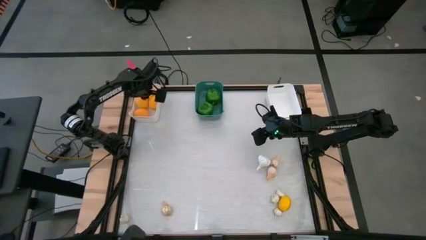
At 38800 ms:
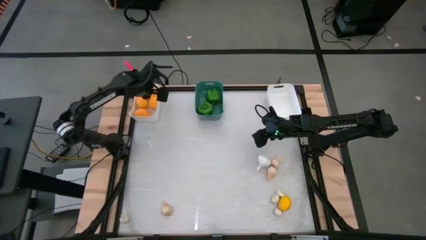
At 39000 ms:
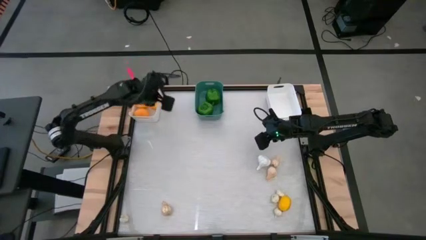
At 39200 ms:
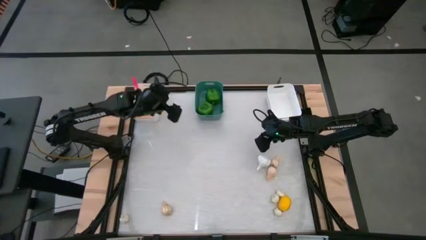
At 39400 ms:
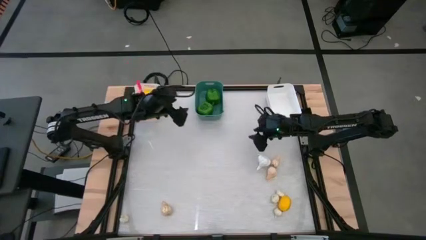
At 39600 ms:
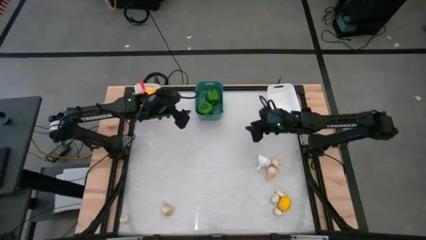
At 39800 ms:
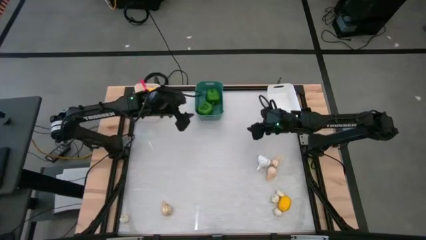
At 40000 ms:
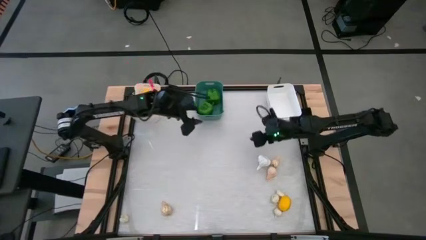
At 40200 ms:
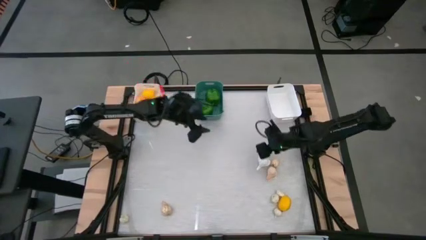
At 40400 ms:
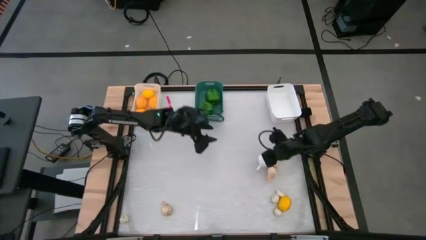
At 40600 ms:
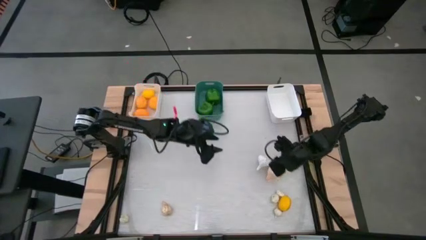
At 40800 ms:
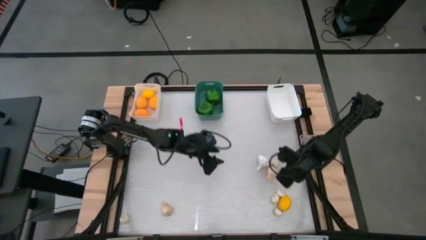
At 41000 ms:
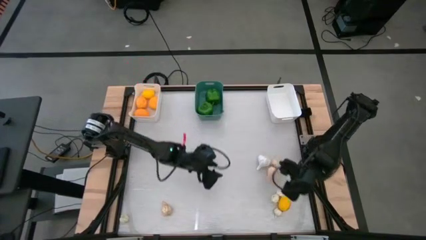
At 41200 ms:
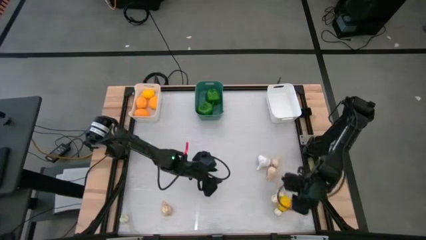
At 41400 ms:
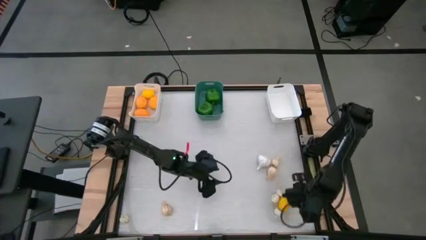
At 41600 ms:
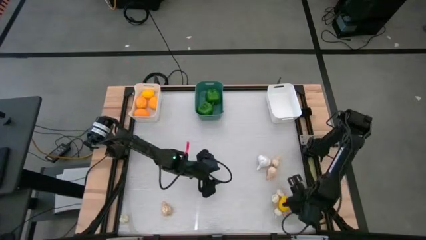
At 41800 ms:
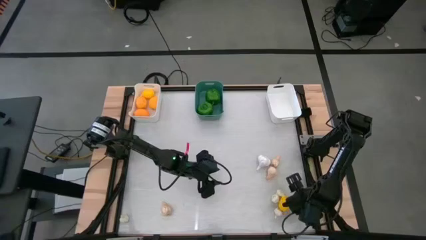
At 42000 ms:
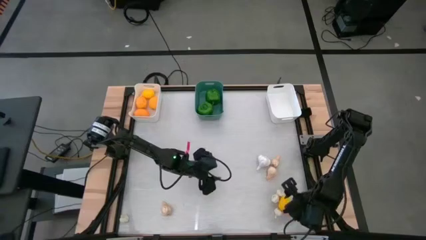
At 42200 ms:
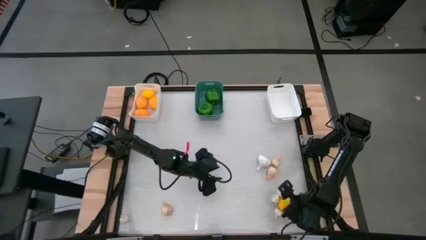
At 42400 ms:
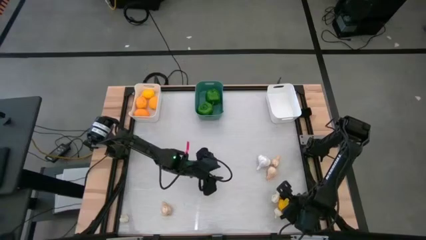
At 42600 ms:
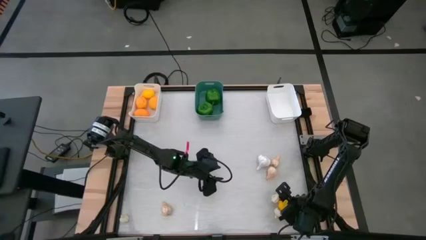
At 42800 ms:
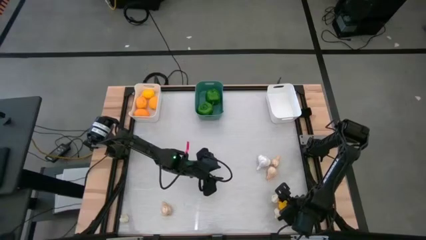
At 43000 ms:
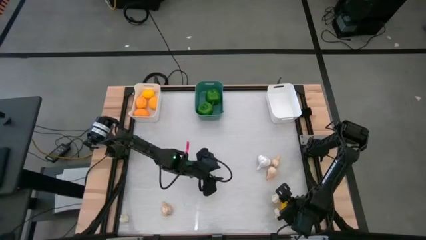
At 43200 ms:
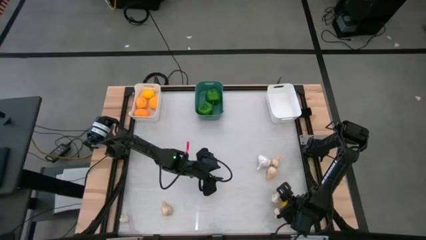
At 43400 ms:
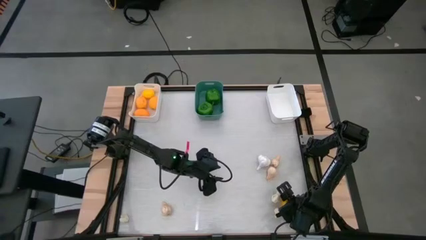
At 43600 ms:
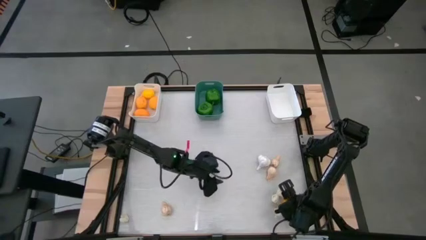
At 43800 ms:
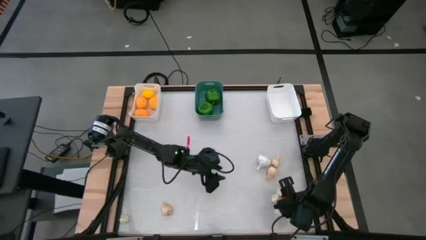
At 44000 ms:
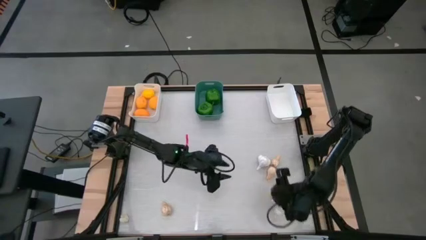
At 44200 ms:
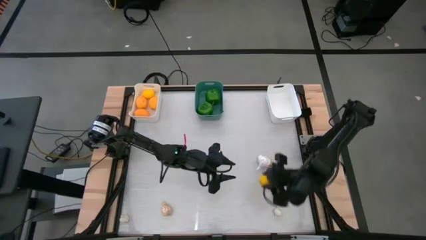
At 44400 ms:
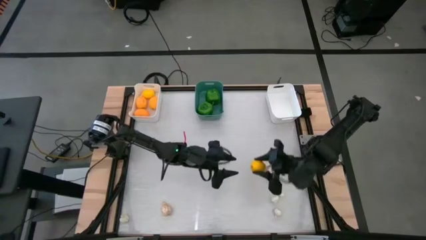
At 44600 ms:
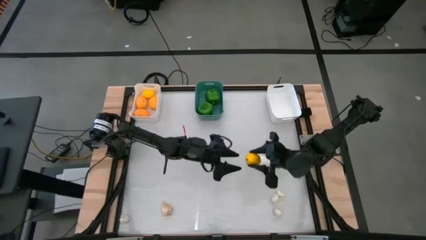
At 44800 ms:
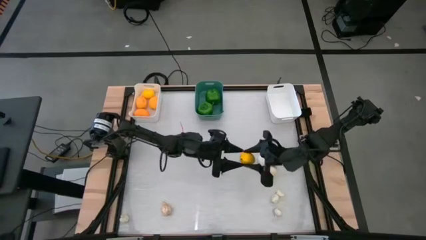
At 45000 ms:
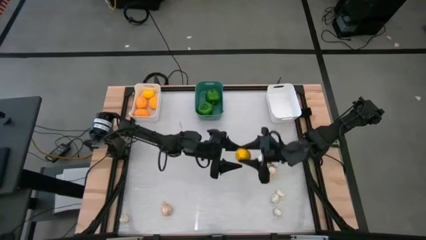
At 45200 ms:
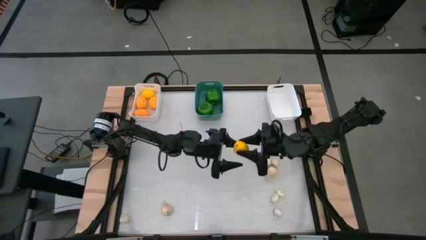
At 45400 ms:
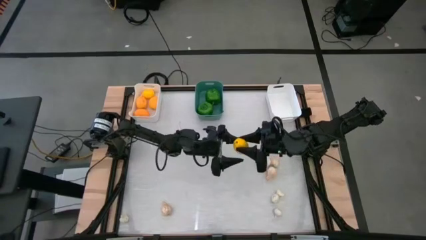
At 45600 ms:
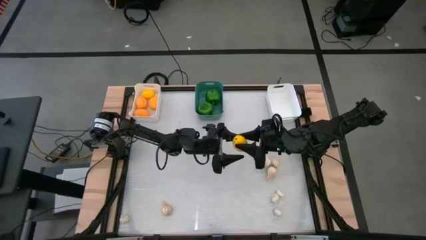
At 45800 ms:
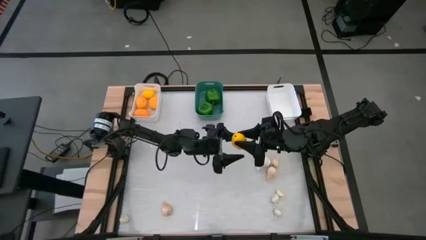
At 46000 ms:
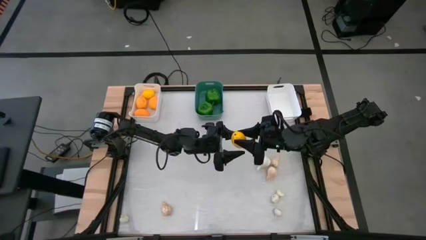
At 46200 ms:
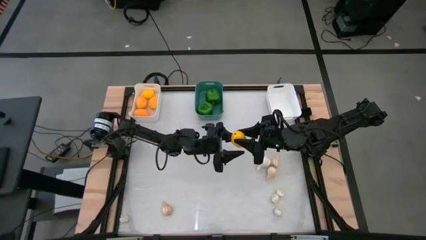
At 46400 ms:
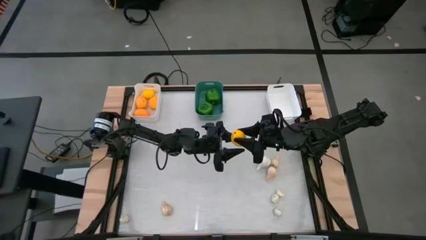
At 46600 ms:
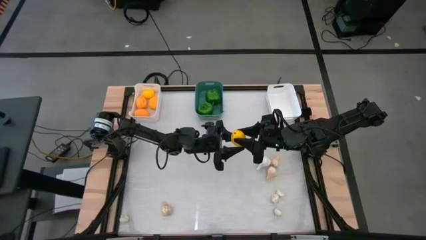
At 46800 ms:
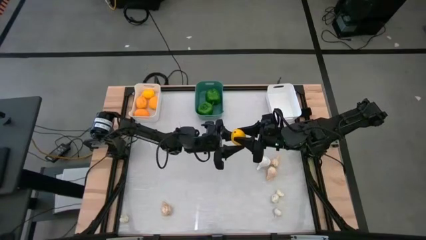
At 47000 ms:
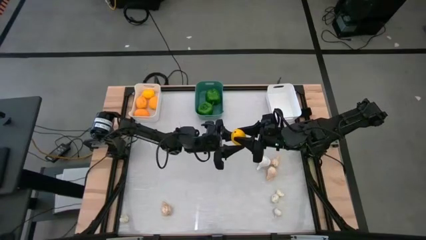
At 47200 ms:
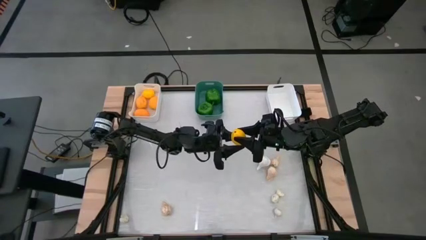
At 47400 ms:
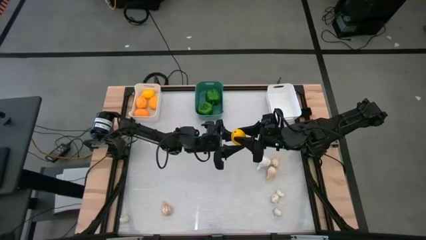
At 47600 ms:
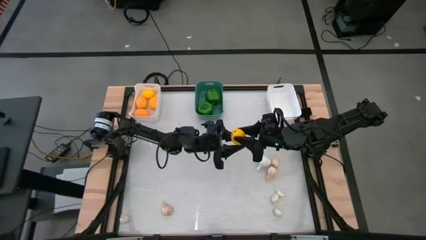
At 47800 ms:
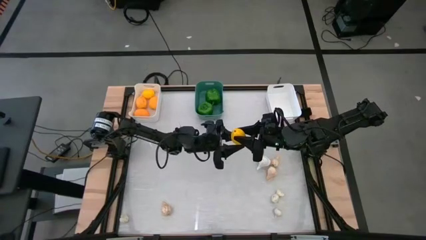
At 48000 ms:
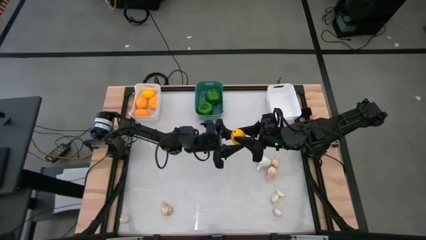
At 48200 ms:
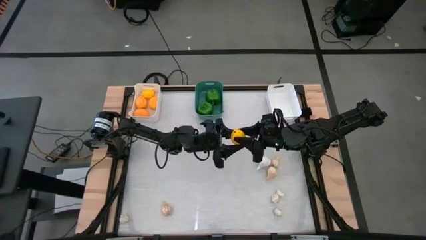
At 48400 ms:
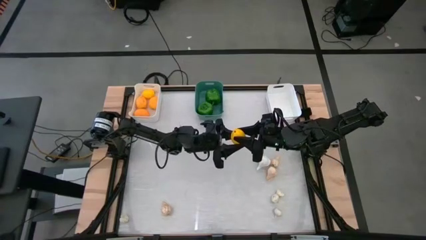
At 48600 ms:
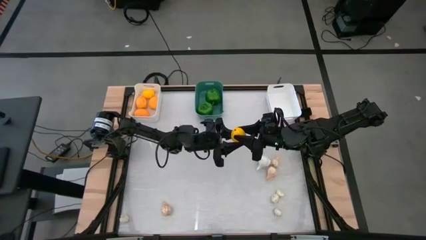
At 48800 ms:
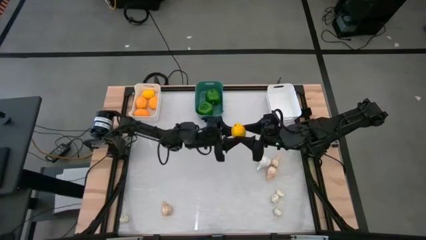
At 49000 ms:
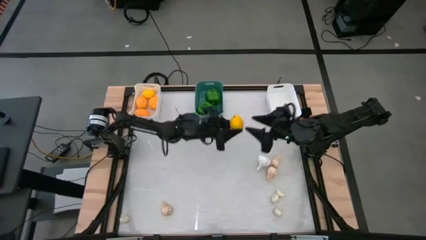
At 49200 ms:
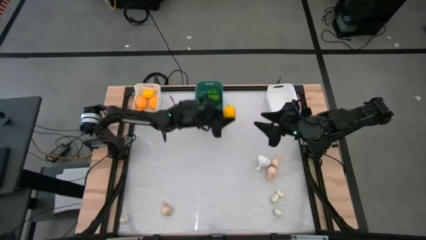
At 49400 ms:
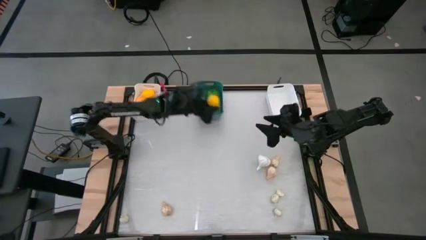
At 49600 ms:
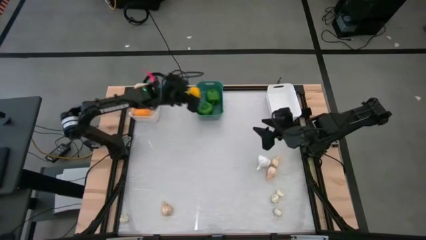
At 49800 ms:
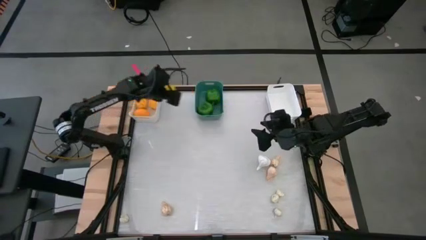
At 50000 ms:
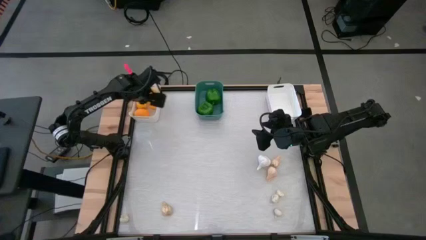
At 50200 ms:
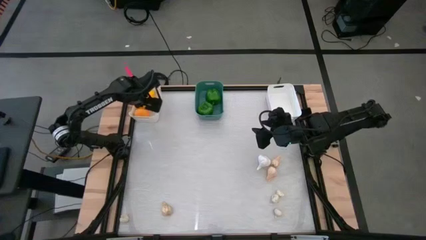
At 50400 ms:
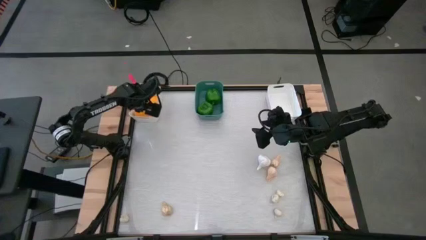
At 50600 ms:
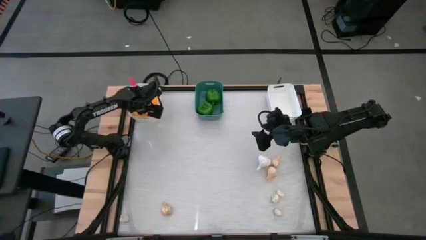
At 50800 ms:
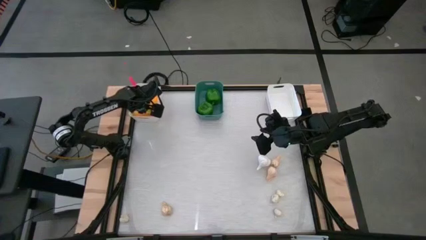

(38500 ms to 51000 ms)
Task: Sort produce into baskets
Put the yellow lemon into the left white bin

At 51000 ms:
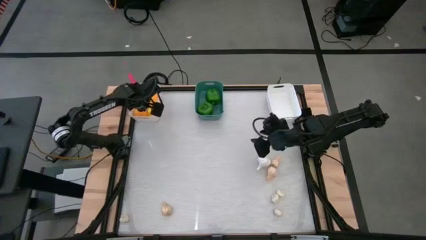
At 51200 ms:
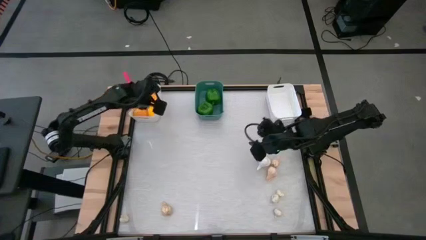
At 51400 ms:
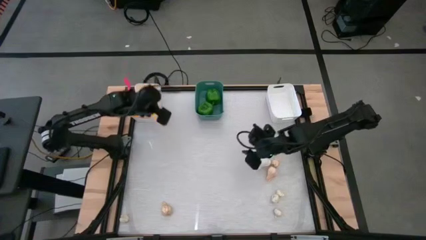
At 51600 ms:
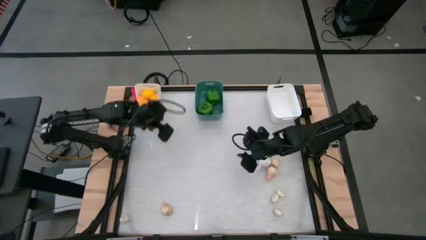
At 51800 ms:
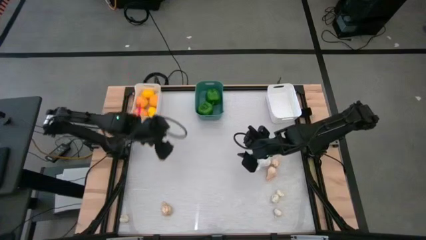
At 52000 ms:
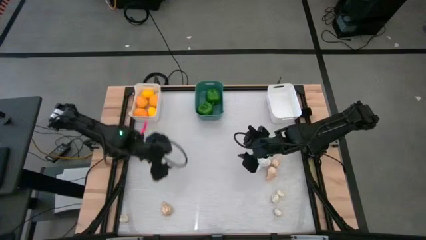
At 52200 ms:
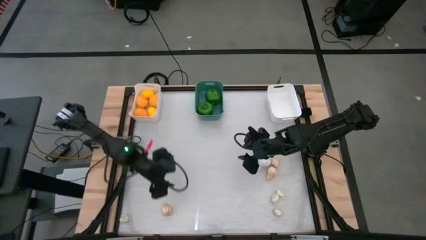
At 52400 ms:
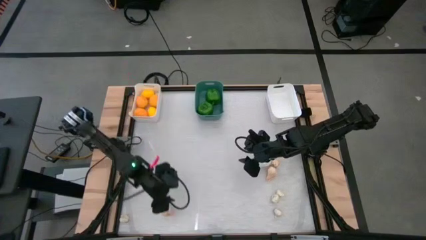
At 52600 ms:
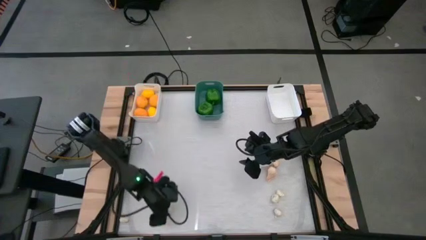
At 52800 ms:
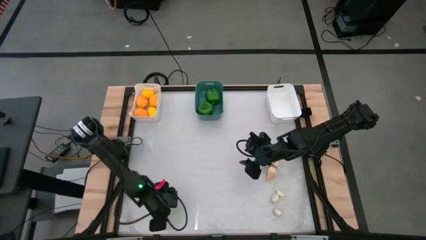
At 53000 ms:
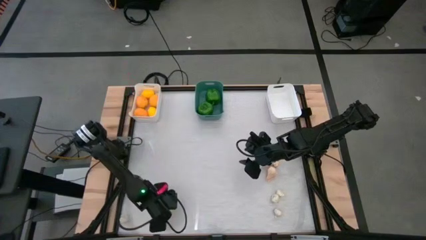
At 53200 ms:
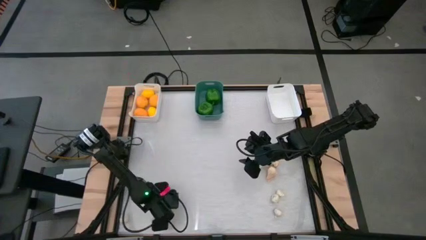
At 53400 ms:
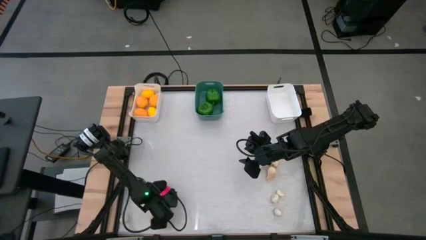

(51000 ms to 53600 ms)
Put the bottom left white garlic into the right white bin

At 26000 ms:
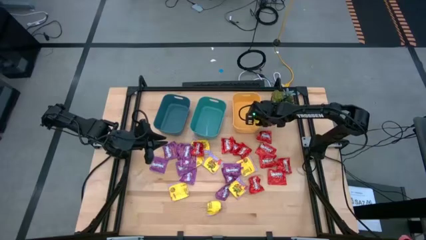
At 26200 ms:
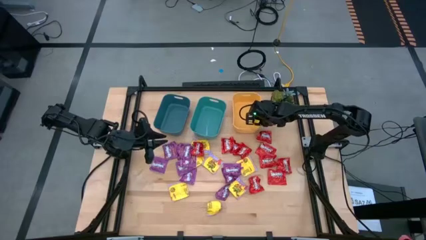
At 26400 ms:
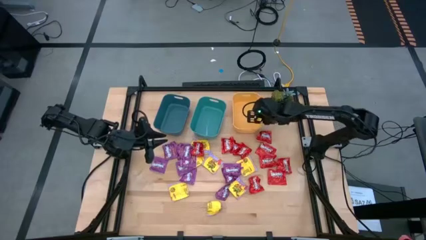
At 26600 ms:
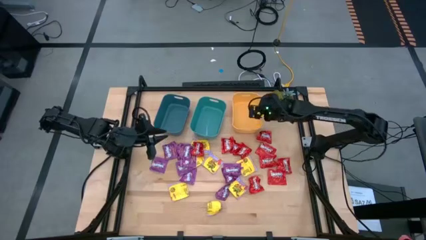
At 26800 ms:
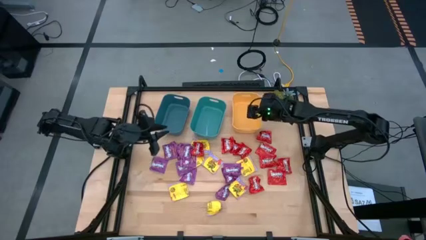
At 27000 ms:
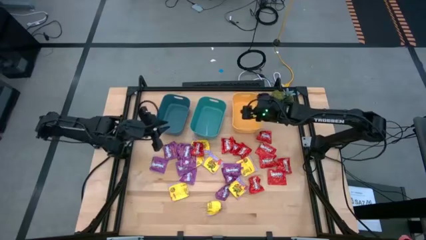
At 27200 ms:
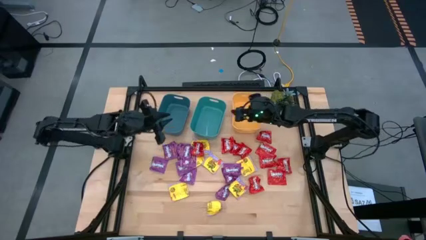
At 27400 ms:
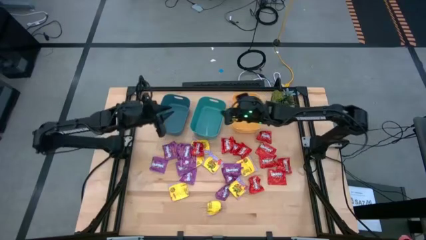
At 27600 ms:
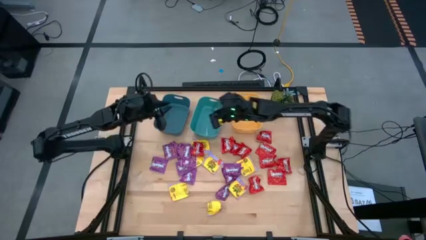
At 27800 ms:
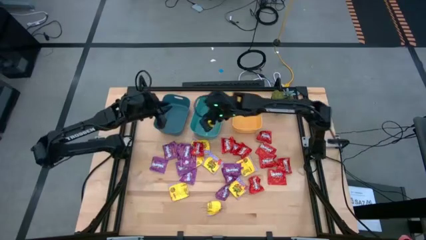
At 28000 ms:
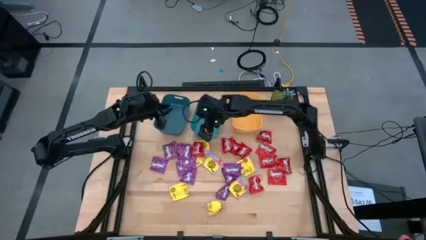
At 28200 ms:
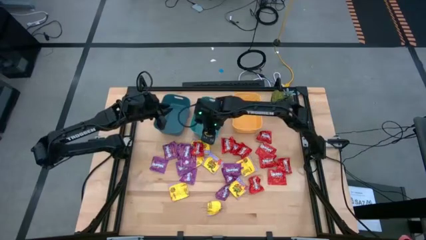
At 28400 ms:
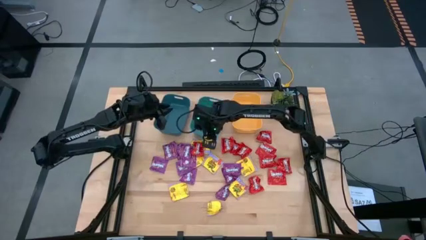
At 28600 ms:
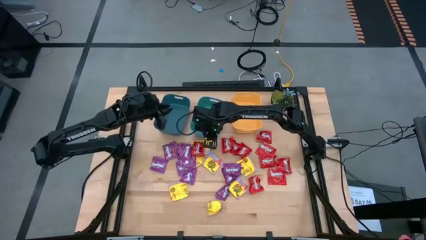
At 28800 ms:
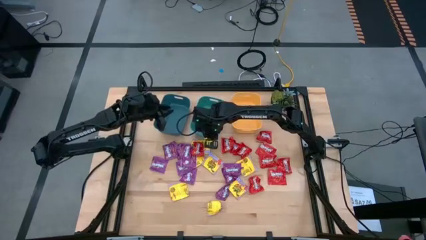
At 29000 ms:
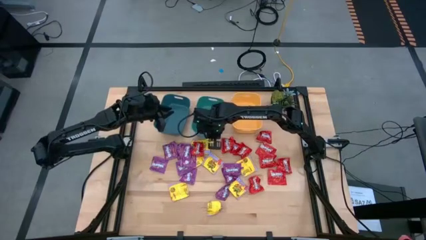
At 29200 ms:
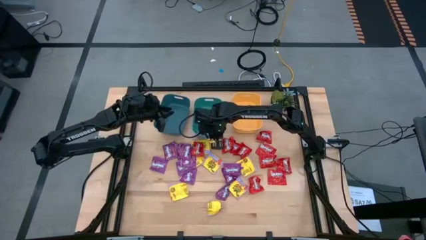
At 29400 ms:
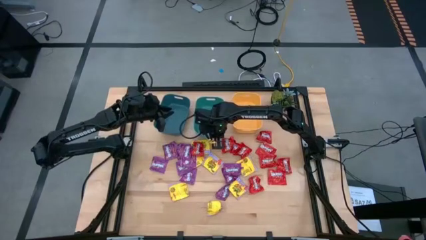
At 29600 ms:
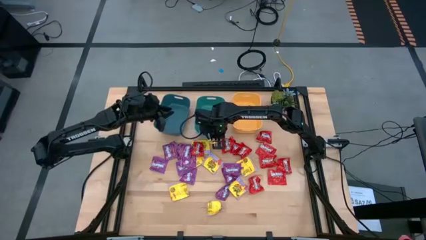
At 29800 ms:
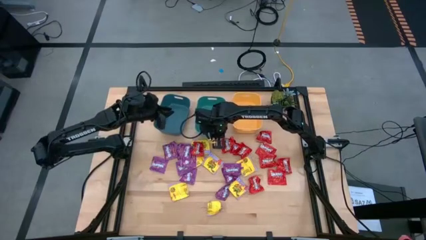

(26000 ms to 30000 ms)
Task: Sort candy
Adjust the green bin
